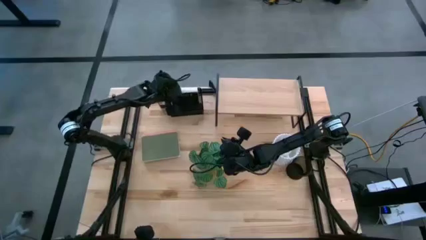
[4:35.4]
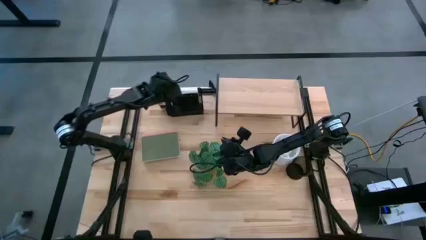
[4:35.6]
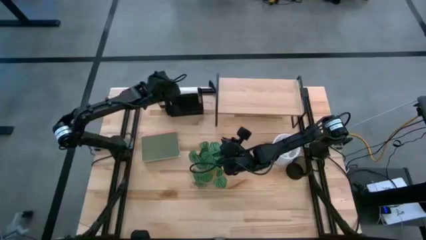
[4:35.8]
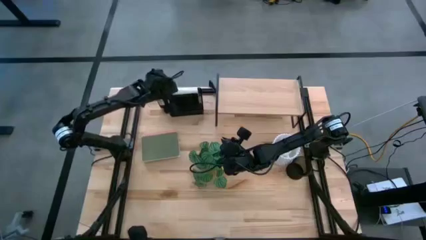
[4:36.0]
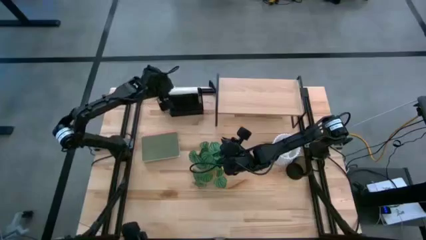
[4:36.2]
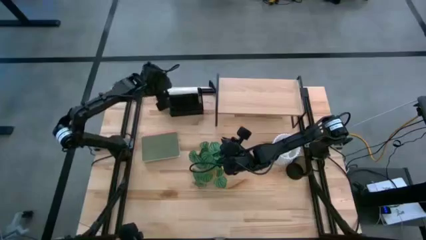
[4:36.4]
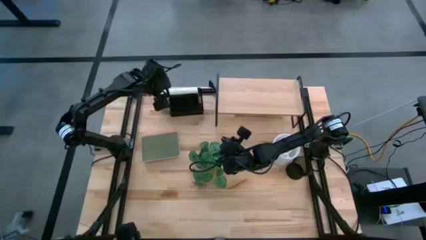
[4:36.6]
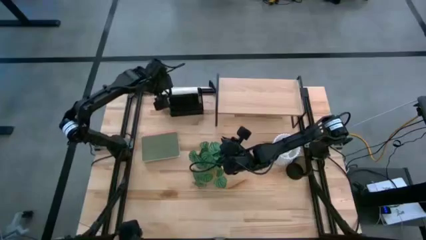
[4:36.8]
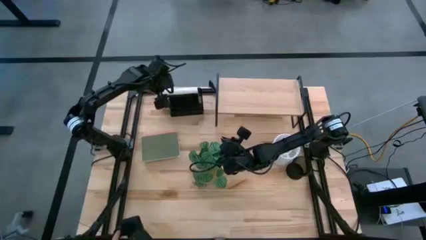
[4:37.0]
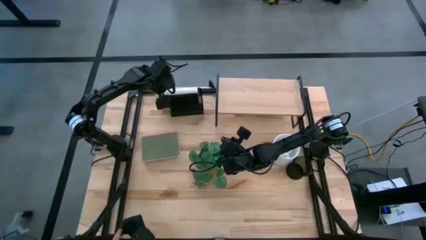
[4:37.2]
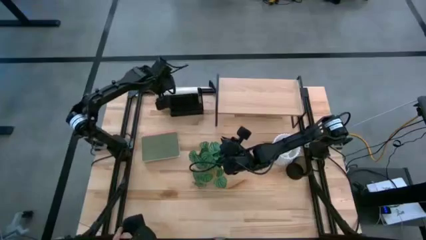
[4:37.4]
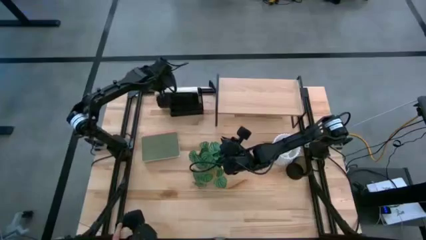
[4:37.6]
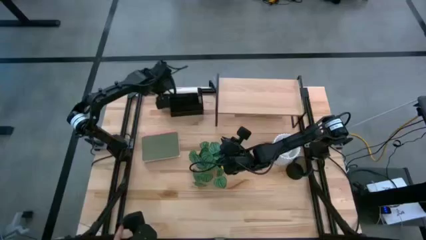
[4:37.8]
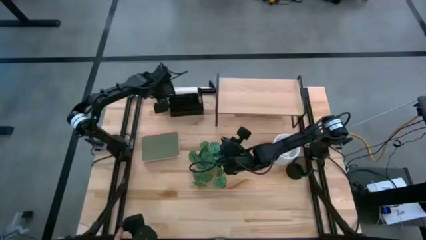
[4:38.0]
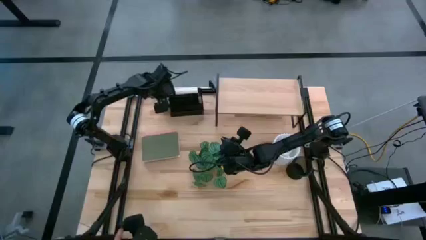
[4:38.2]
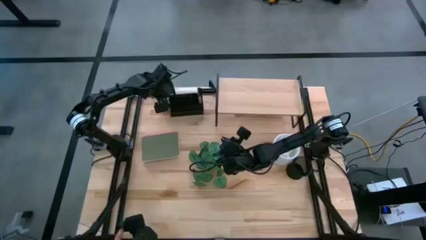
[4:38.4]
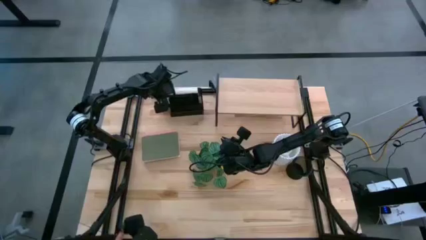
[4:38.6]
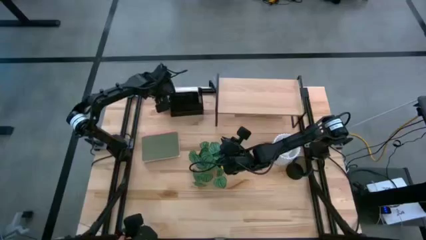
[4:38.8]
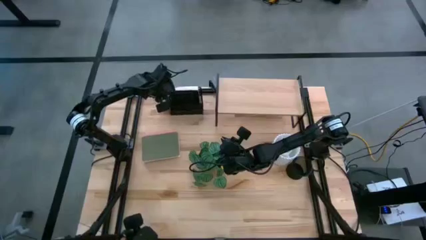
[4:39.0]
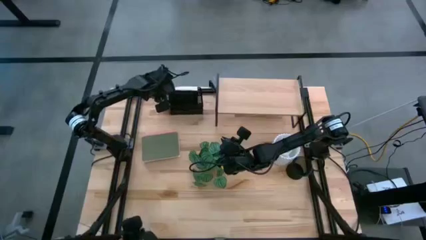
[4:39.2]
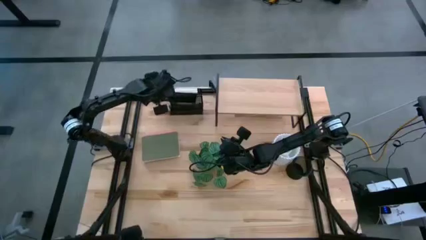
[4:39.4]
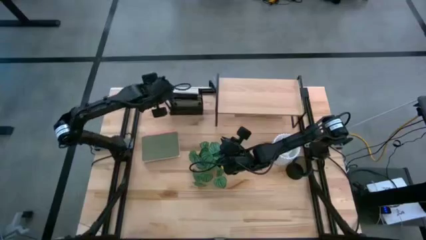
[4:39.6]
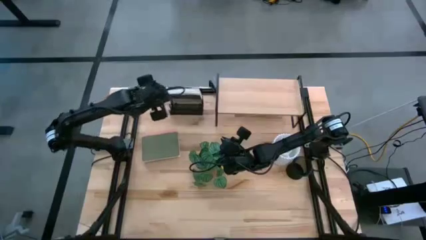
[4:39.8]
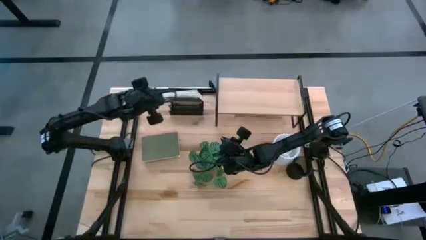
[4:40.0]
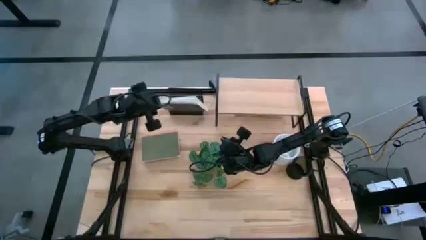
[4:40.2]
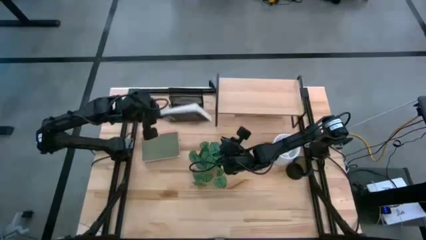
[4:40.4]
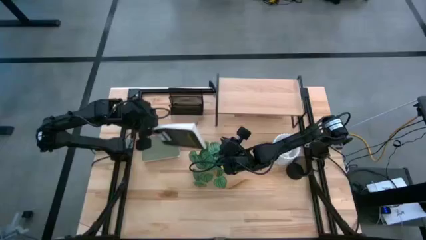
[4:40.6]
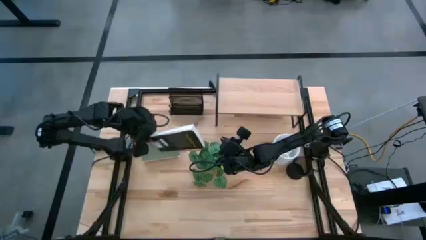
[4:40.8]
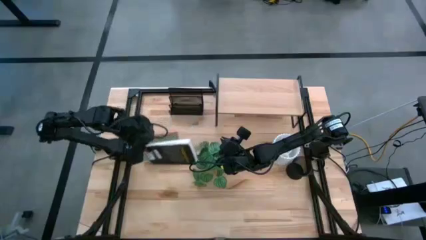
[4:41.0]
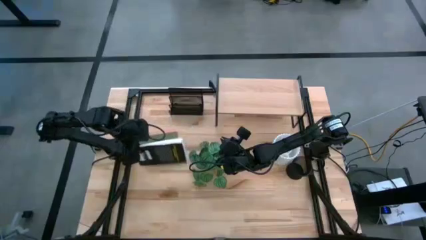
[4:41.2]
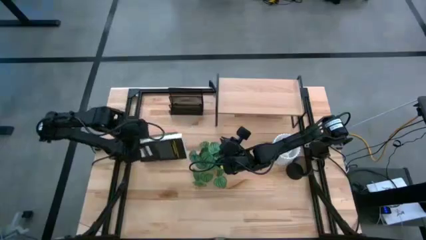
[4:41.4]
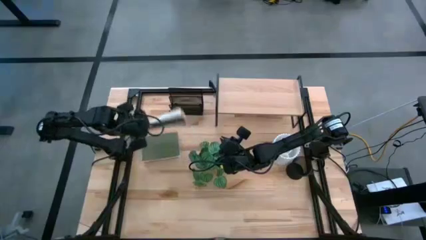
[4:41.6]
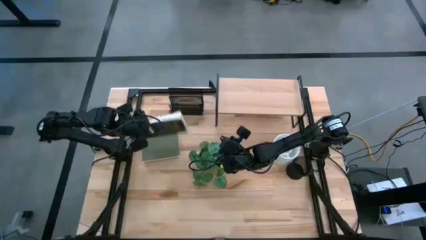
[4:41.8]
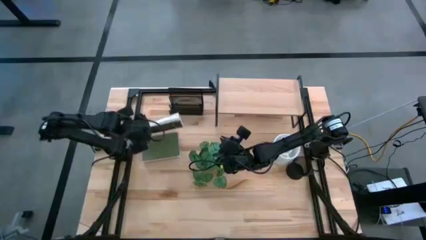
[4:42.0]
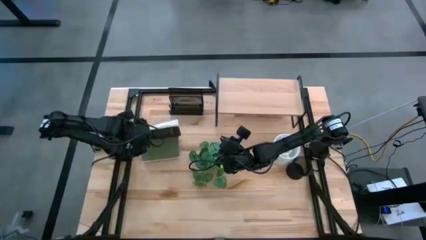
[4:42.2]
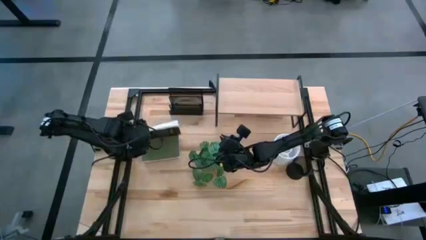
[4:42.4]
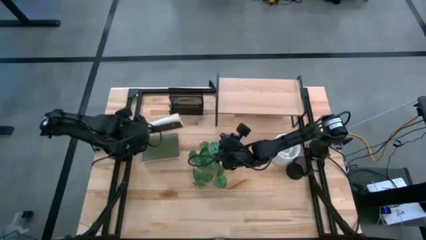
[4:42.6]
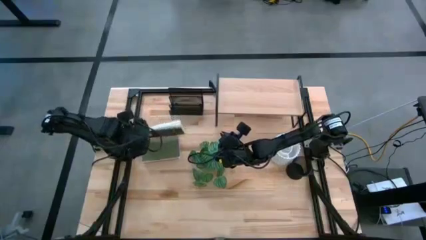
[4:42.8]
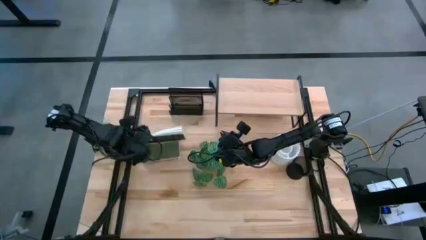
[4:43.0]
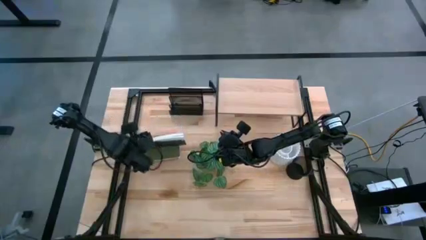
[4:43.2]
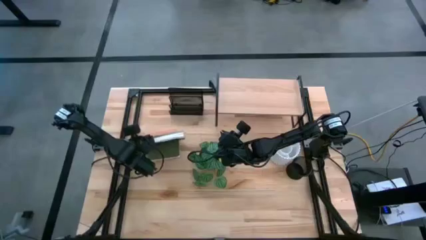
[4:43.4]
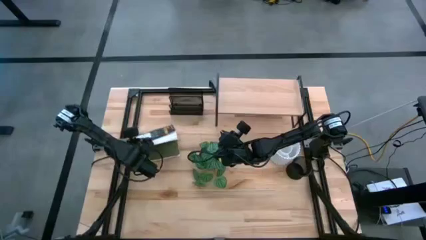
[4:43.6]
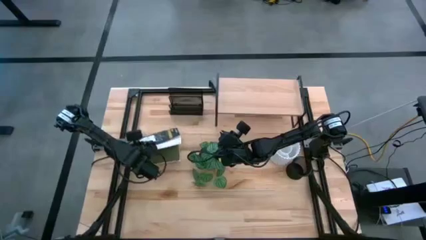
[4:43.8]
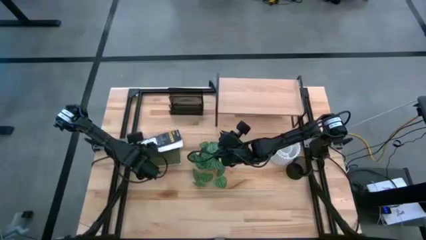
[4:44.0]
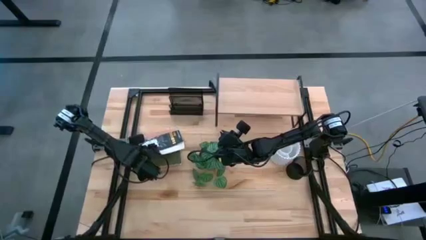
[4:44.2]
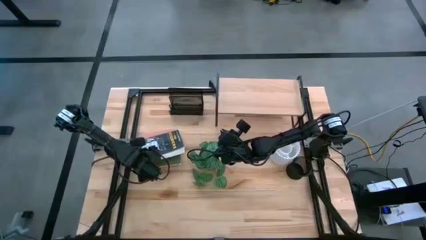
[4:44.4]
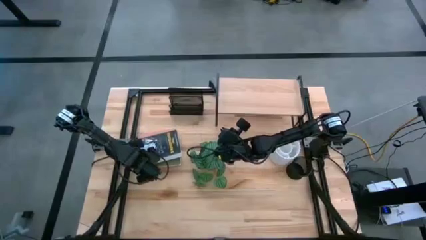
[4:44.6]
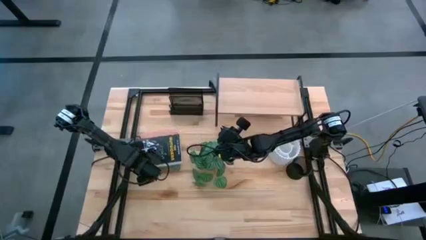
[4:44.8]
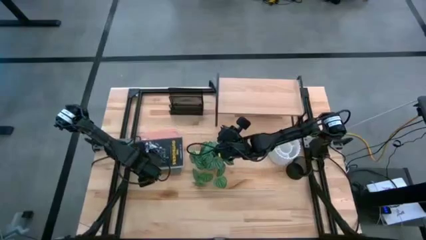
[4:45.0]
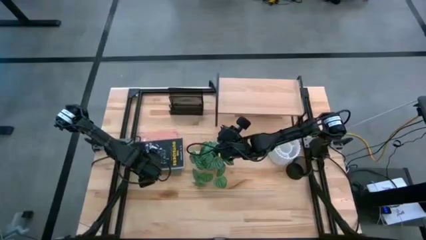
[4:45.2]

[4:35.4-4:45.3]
Task: Stock shelves
Remove the black book from the black mesh bookshelf
